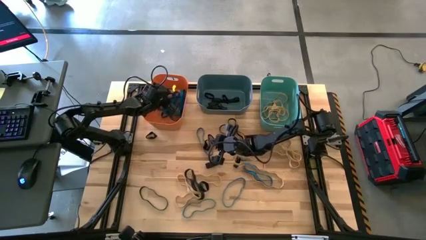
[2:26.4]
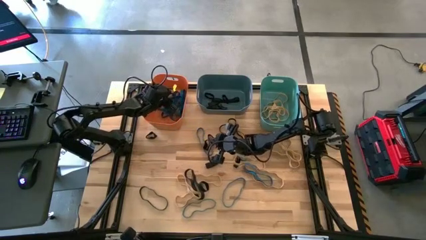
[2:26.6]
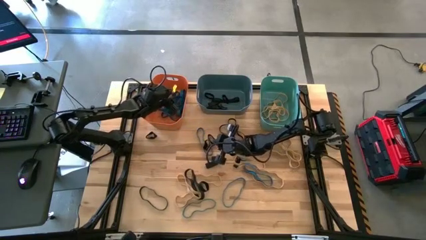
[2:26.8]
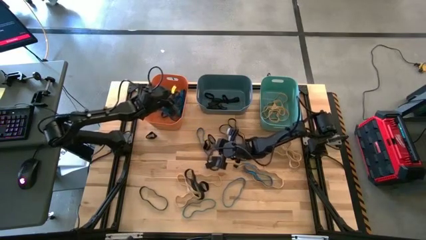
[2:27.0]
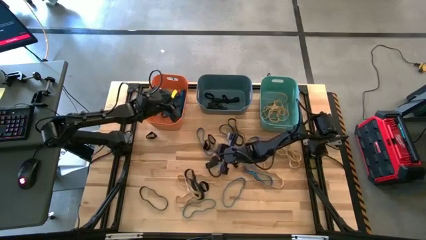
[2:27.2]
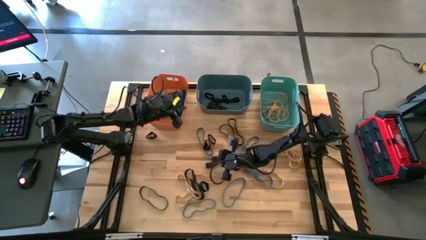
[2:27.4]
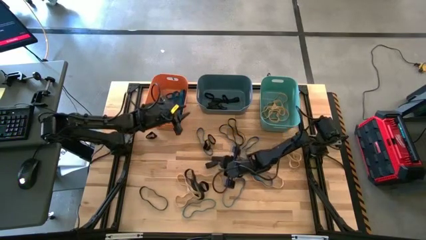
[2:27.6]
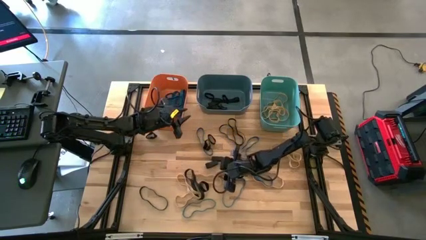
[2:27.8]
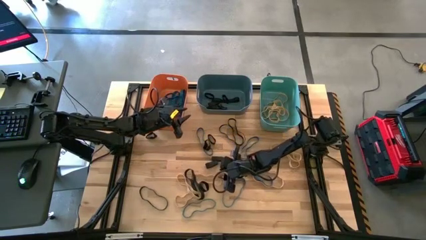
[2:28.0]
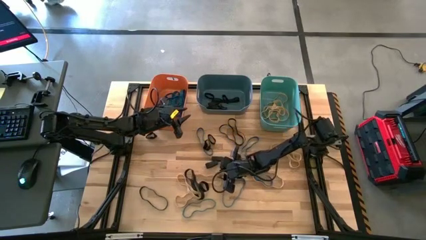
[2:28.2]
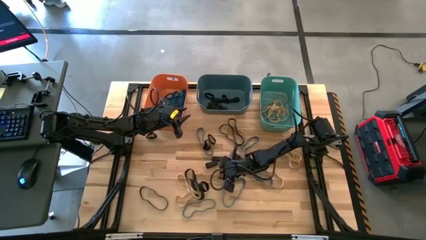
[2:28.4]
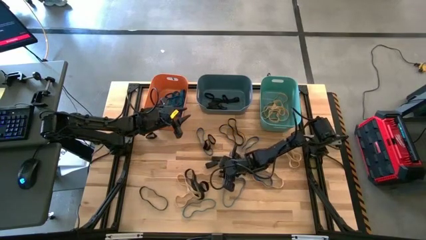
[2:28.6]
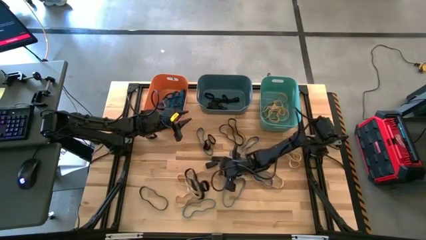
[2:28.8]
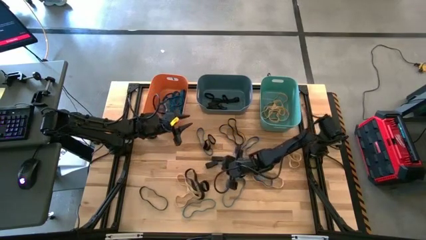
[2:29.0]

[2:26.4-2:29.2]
Task: Sort rubber bands into baskets
Put the brown rubber band into the green bin

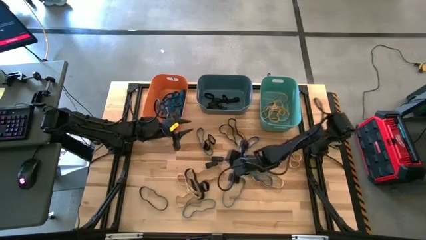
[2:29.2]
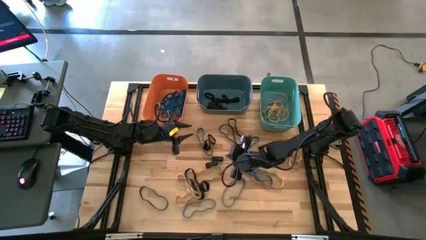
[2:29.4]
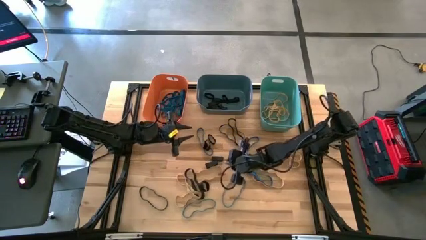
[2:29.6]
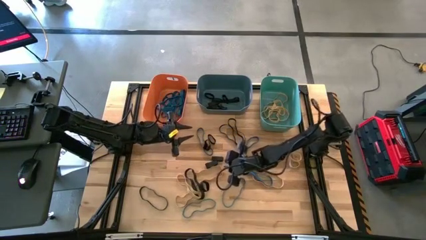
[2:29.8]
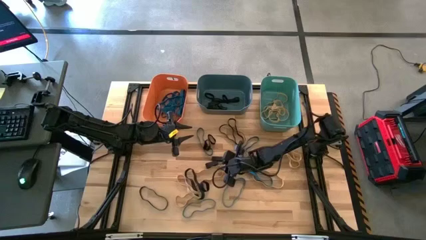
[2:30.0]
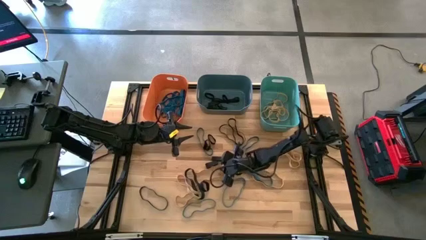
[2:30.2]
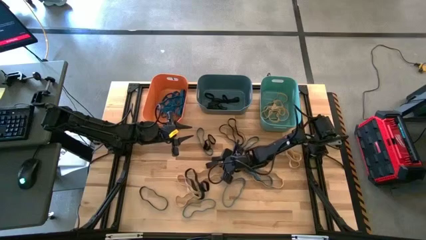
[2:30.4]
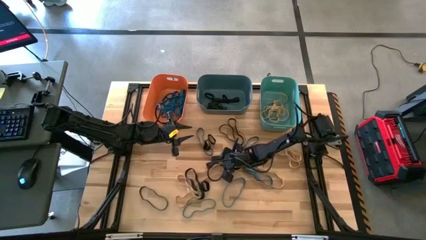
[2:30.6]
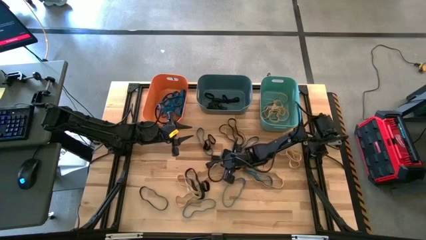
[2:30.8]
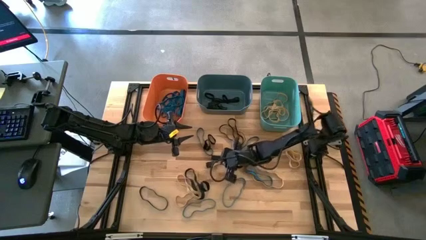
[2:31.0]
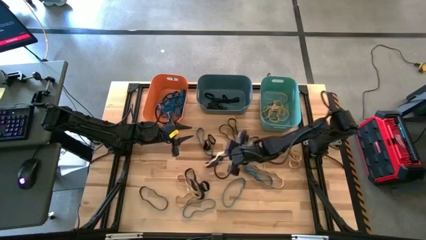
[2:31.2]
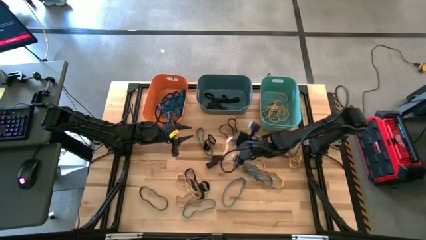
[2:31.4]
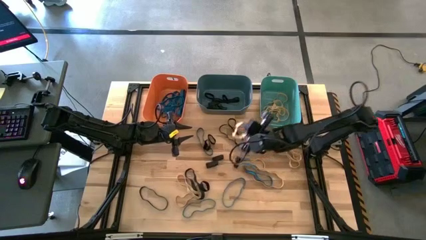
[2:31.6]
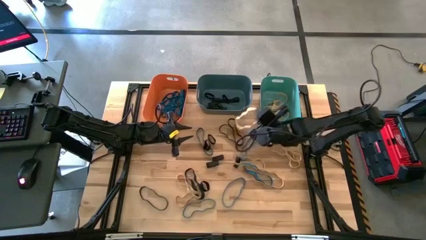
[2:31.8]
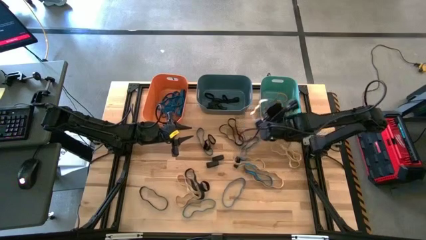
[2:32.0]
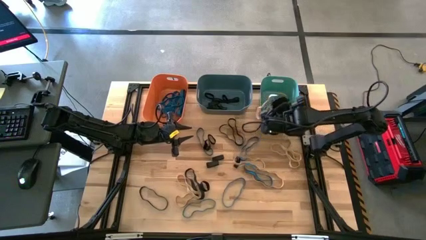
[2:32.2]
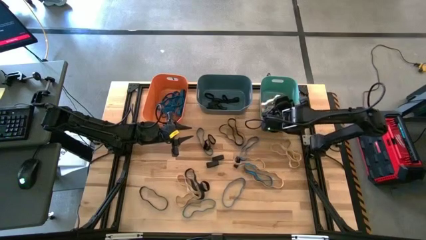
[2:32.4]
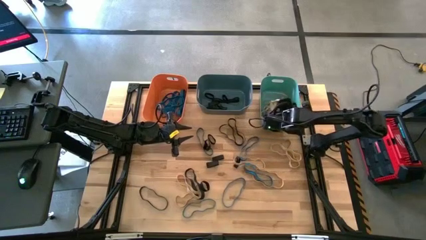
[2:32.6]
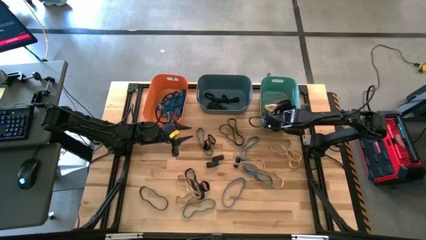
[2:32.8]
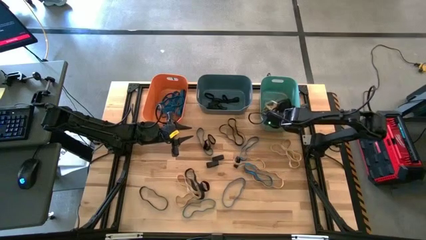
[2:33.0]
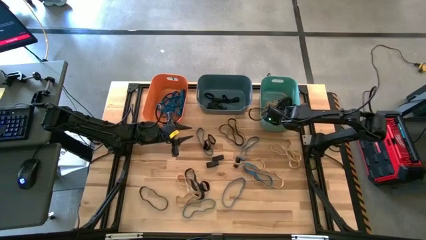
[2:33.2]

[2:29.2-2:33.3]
Put the brown rubber band into the green bin

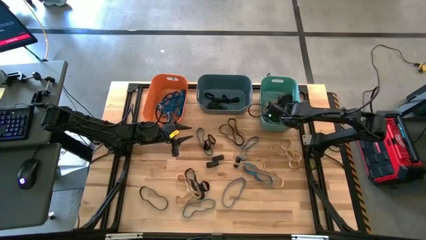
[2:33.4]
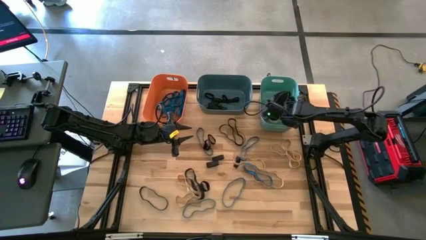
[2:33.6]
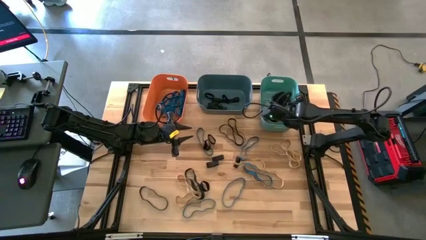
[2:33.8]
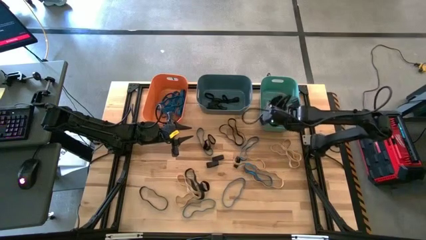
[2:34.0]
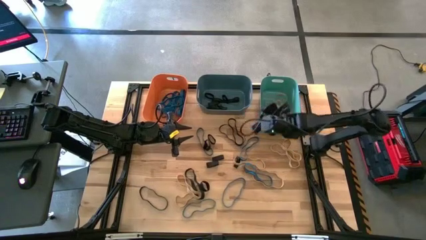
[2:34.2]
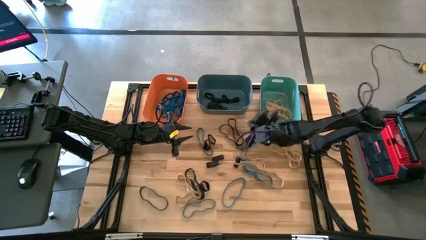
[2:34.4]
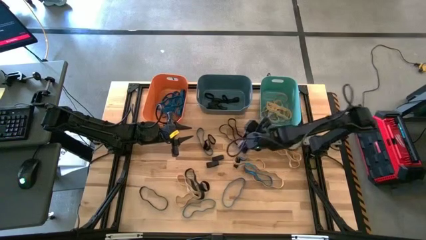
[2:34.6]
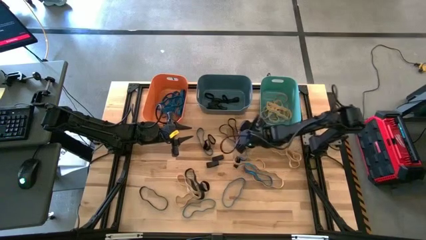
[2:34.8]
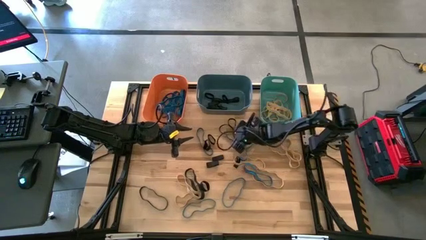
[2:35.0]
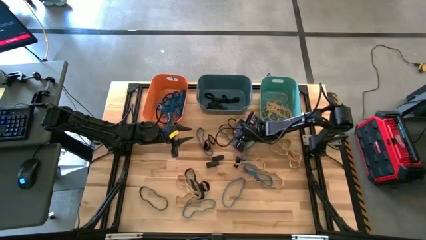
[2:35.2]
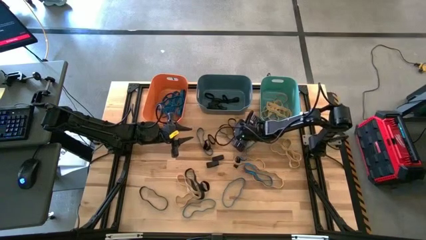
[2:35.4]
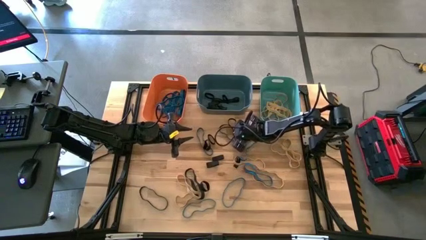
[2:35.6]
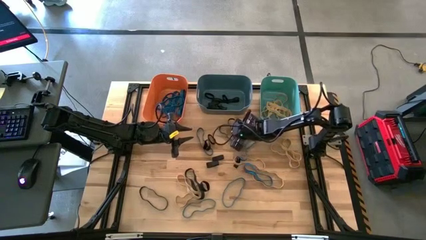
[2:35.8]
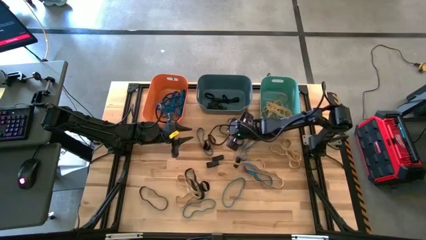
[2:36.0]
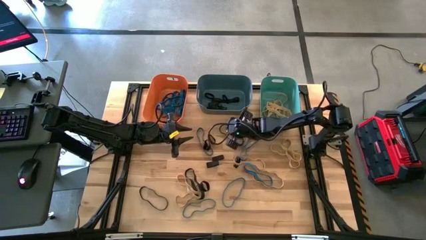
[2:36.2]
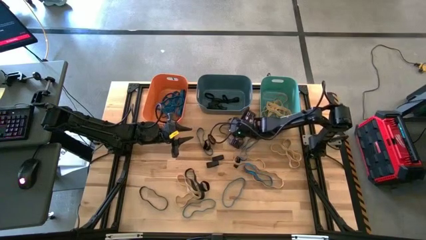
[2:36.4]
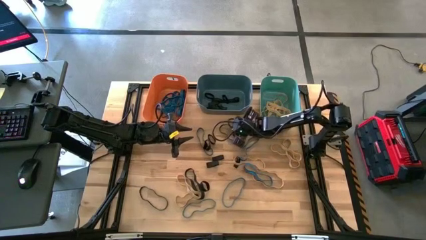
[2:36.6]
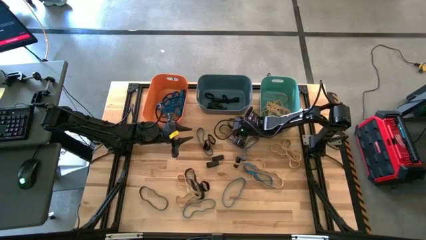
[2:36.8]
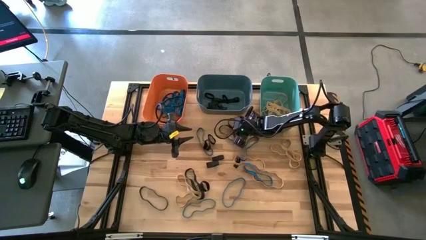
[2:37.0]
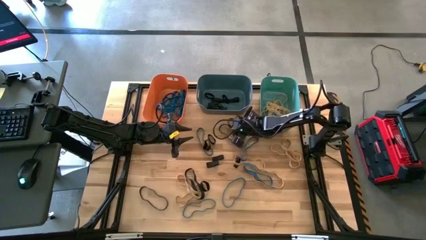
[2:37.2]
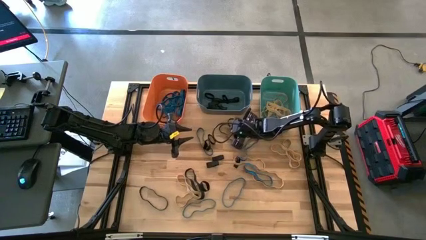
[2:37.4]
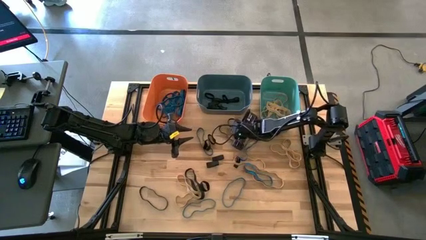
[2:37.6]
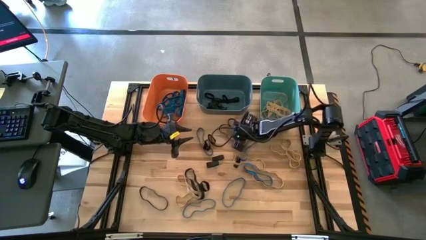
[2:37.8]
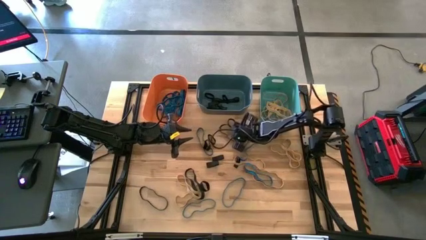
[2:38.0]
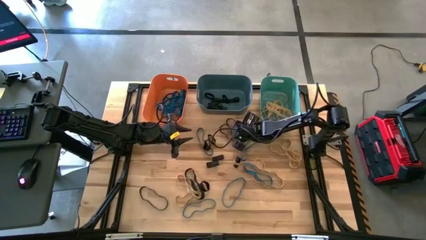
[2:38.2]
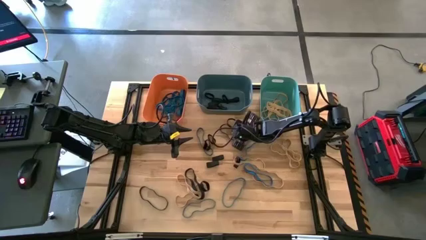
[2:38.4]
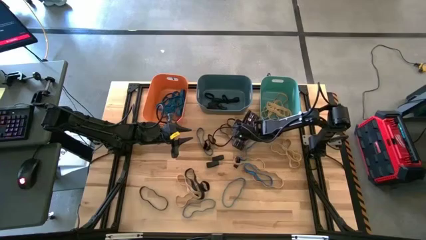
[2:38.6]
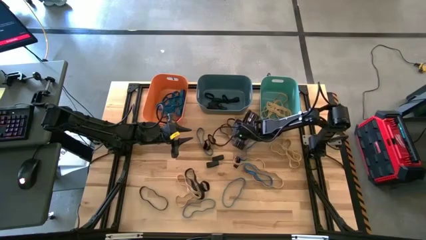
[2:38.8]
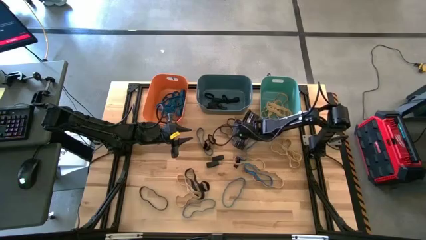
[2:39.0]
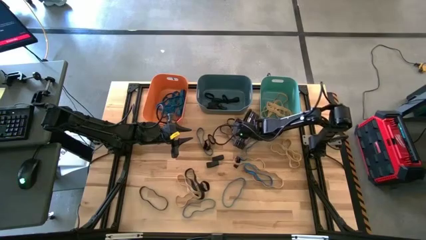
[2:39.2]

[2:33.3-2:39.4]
Put the black rubber band into the blue bin

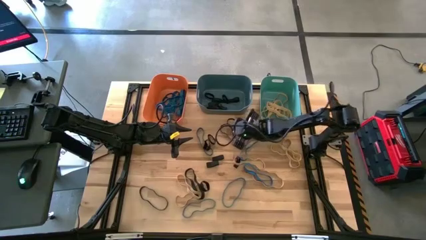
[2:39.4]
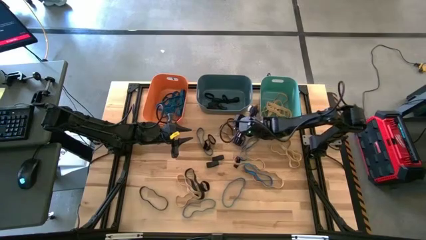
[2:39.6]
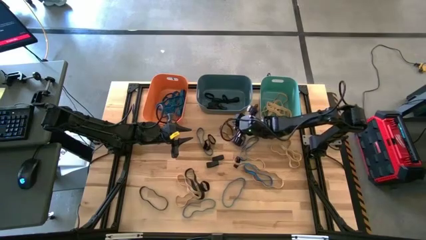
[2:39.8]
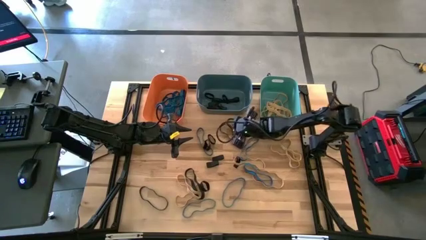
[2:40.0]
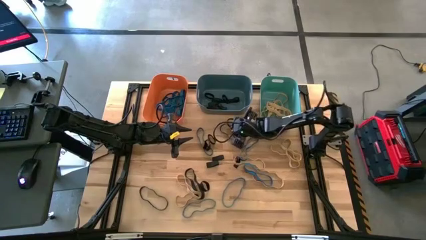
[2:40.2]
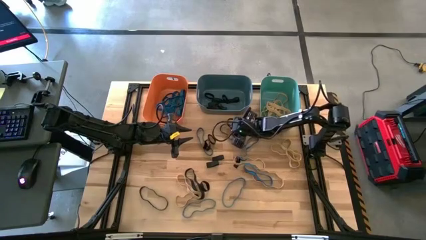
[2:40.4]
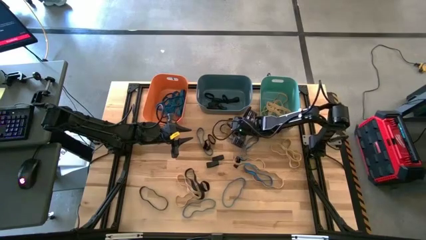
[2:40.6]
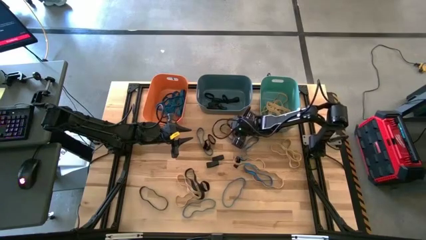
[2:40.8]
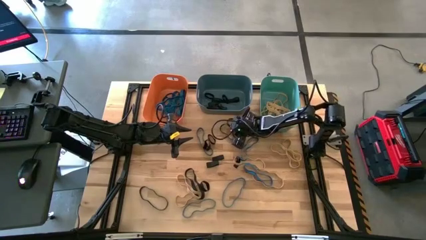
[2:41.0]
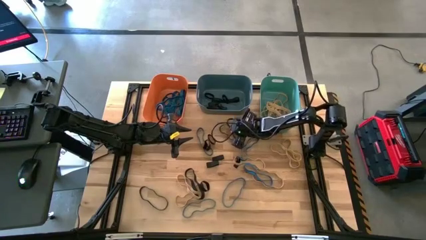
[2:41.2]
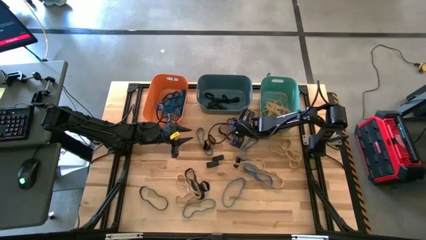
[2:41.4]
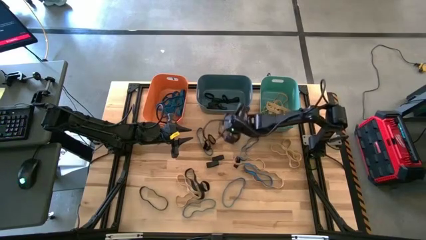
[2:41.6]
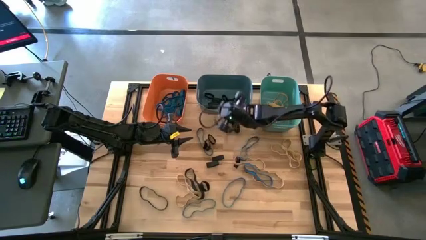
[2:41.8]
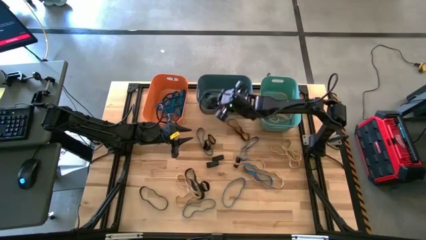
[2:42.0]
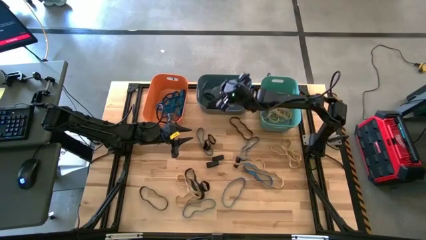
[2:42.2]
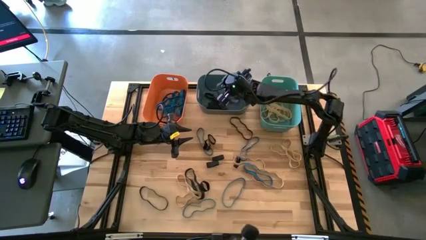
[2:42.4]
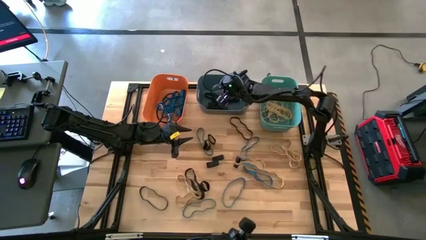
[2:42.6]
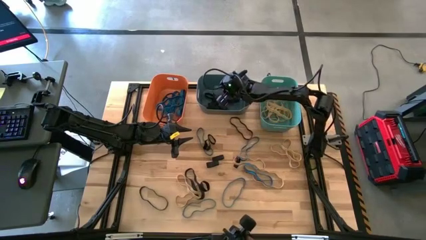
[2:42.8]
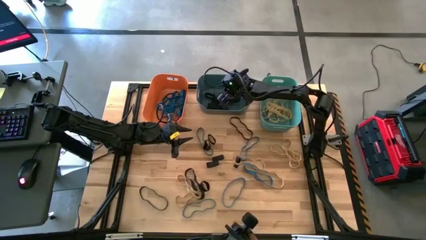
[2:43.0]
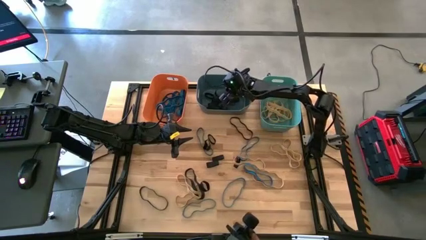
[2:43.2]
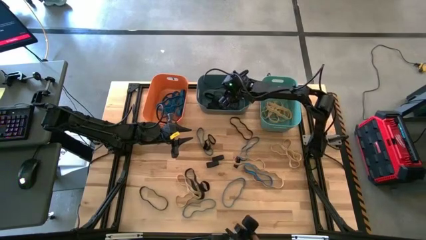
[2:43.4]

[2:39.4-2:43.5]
Put the black rubber band into the blue bin
